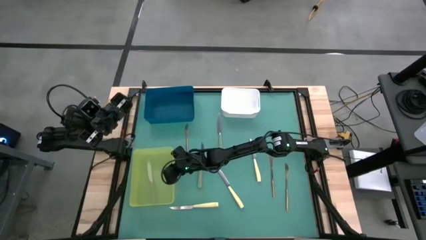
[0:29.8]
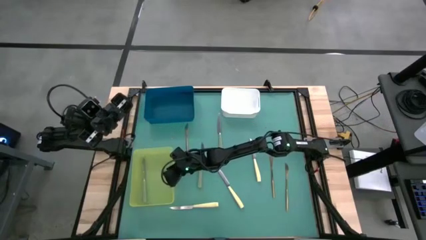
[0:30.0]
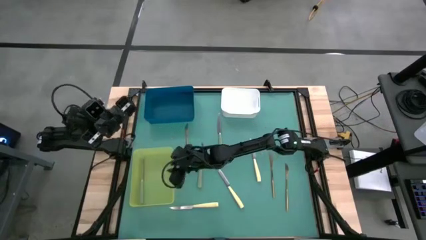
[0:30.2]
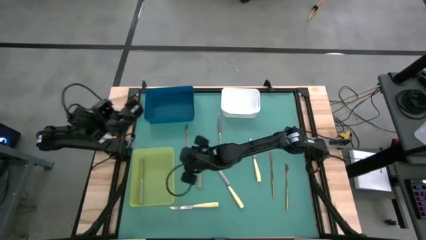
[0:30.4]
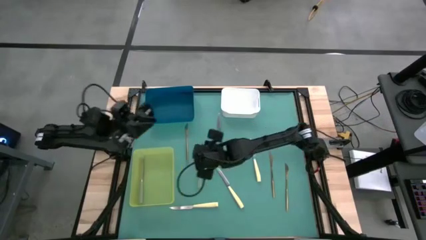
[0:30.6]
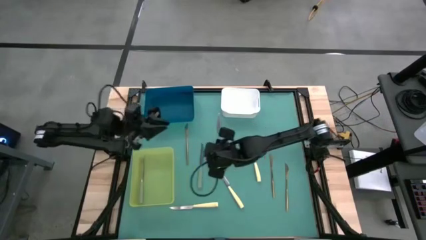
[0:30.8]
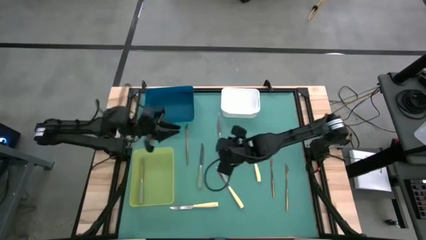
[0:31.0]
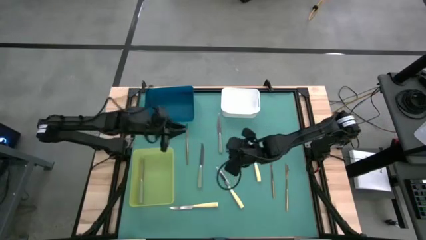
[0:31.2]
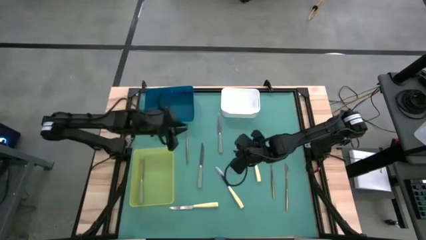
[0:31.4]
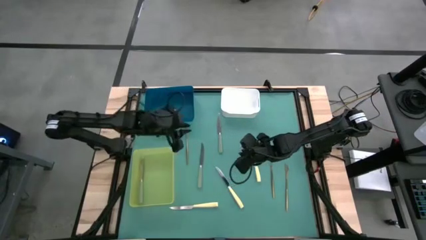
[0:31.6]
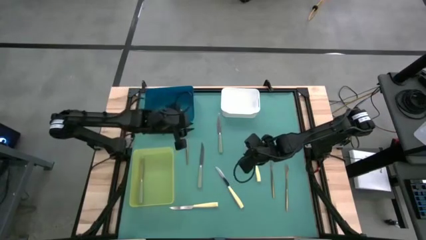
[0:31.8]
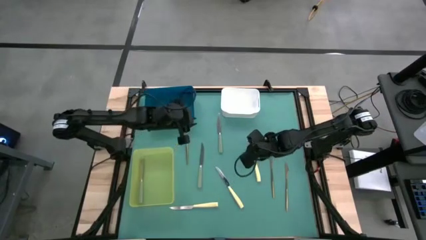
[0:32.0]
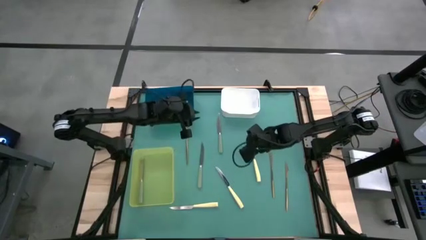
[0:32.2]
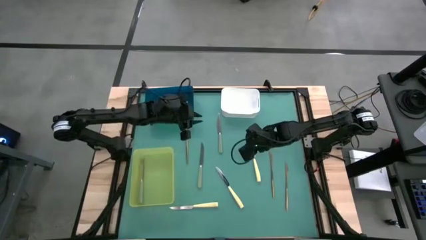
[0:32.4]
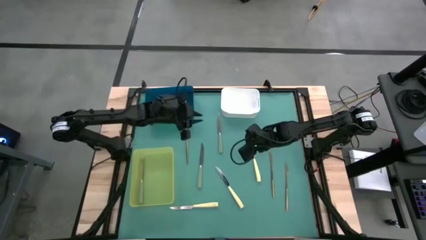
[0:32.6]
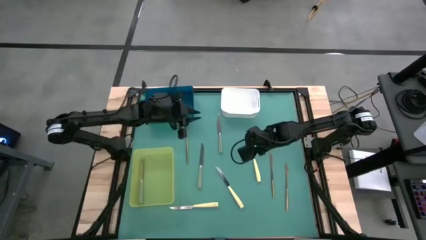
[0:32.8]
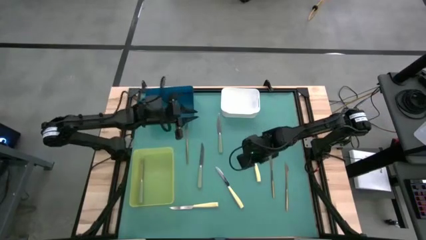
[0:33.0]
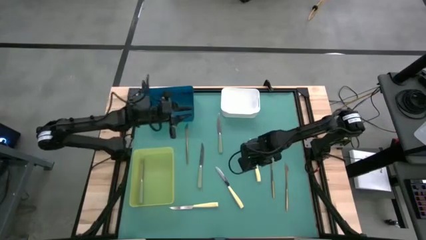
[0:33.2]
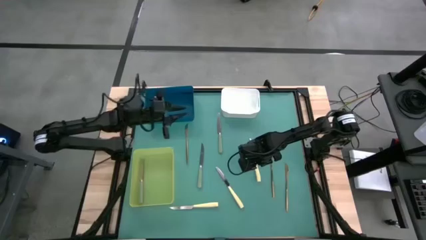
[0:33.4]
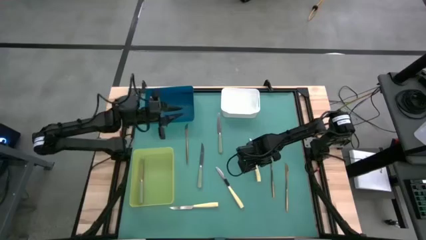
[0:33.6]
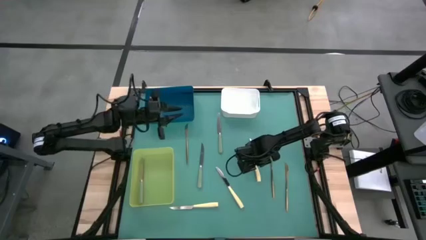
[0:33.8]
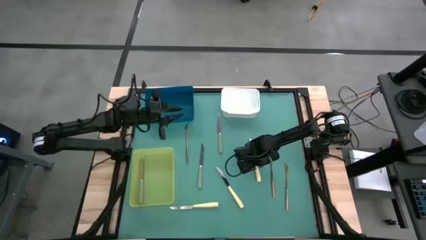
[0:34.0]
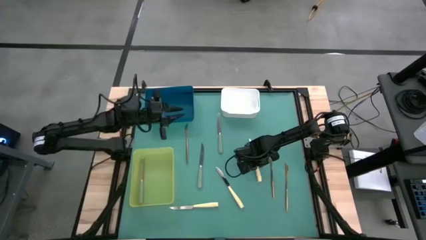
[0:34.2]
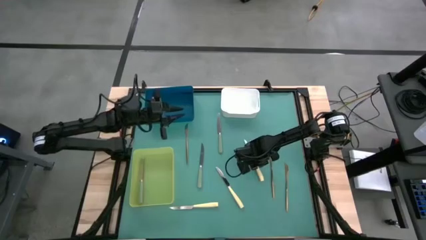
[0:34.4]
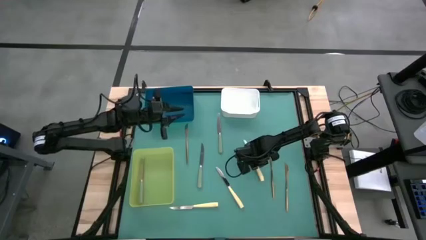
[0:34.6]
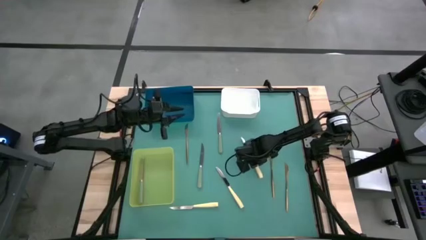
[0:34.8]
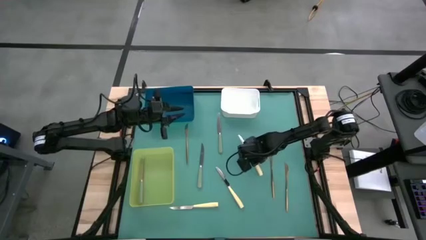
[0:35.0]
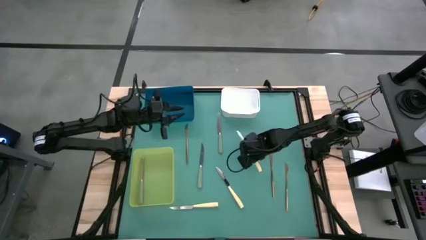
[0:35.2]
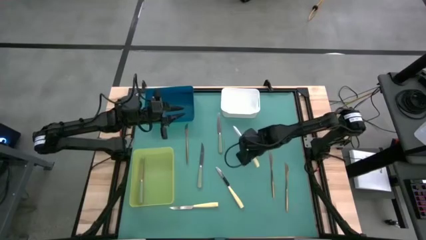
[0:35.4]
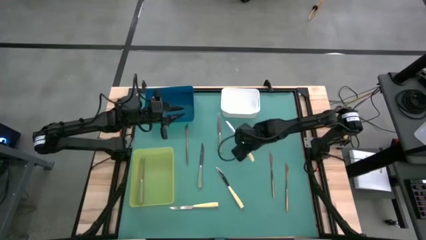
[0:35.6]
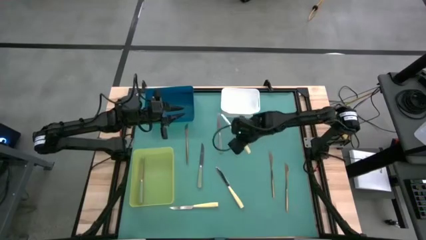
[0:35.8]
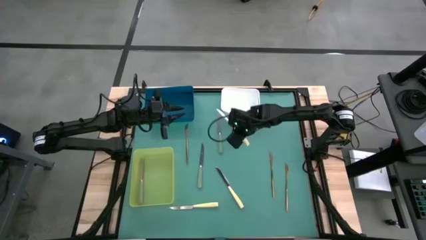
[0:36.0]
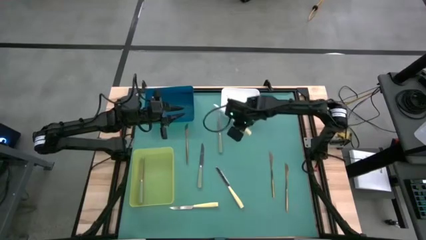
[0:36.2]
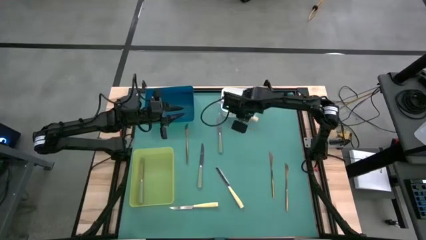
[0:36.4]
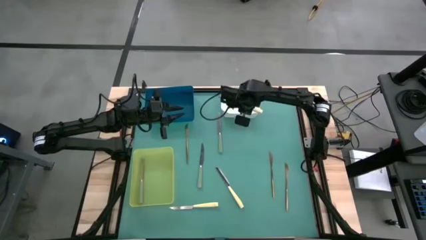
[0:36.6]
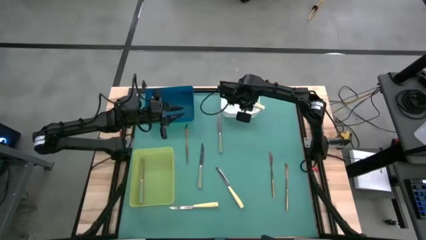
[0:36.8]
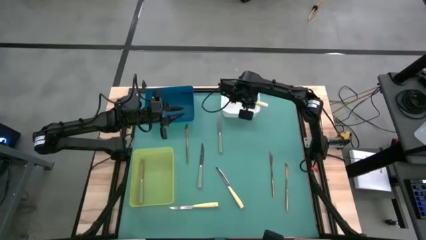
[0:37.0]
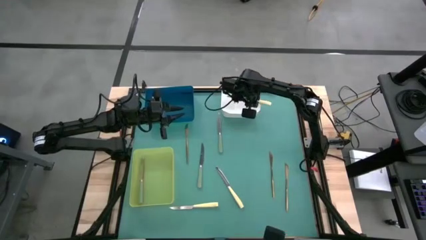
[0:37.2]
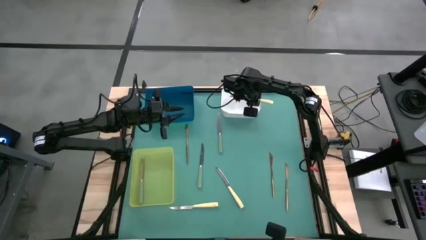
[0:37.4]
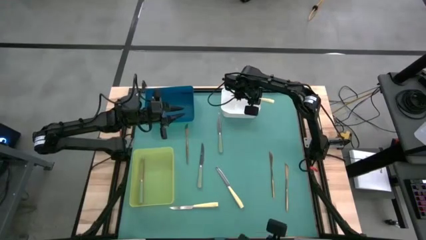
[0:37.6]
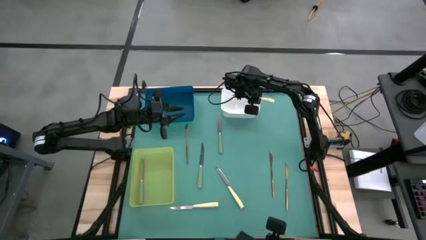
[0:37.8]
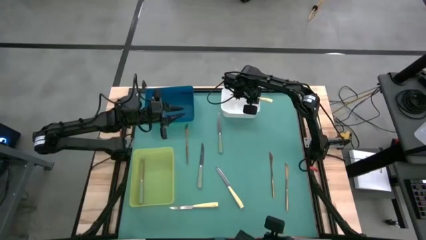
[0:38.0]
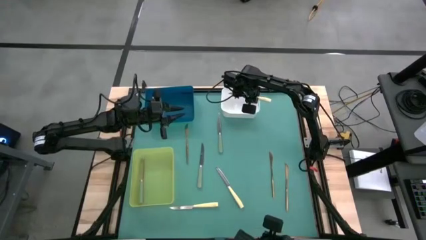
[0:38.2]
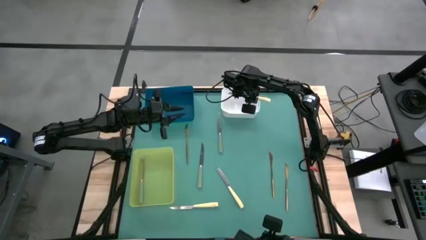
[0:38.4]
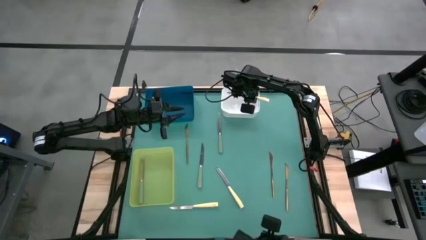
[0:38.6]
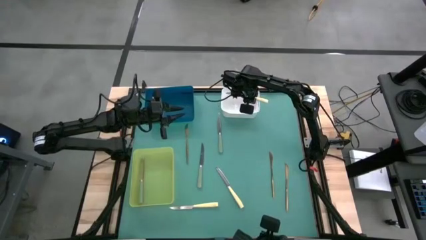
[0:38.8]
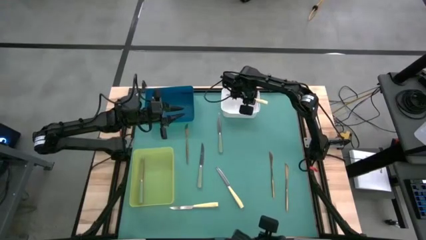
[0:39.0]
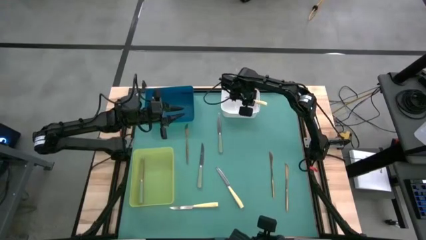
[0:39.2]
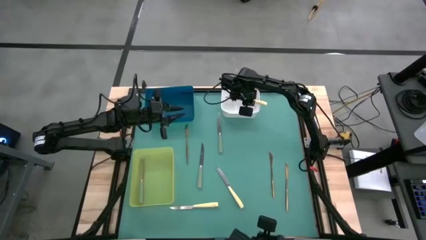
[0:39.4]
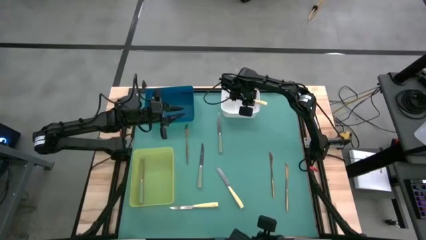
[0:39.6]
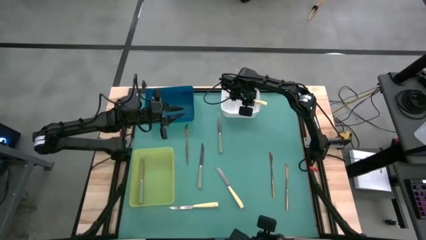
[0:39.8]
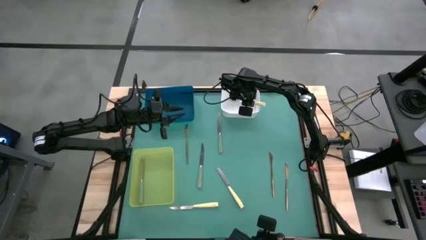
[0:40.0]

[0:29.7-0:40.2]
Task: Sort silverware by color (type)
Put the top yellow knife into the white bin

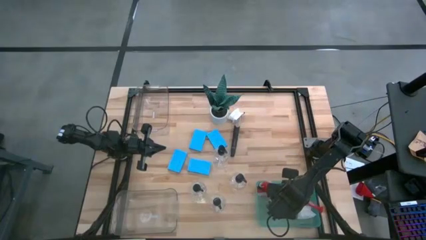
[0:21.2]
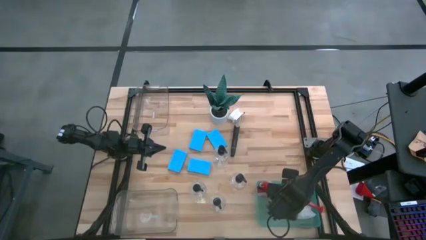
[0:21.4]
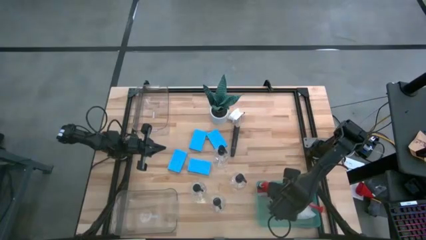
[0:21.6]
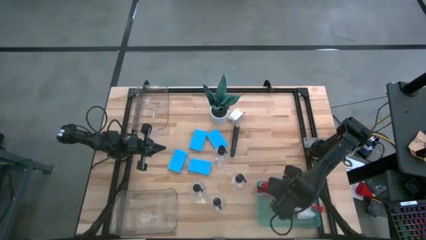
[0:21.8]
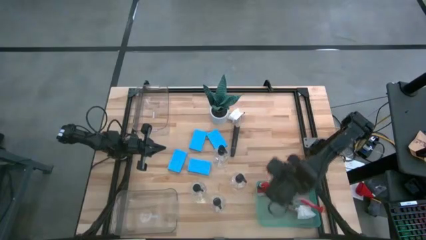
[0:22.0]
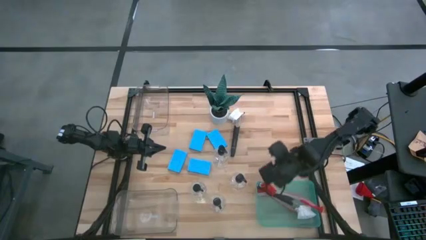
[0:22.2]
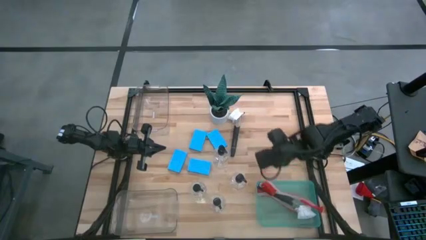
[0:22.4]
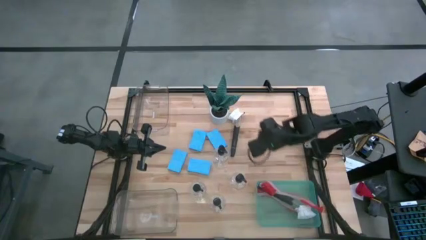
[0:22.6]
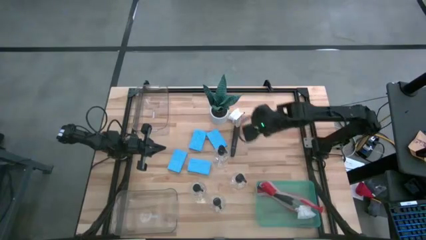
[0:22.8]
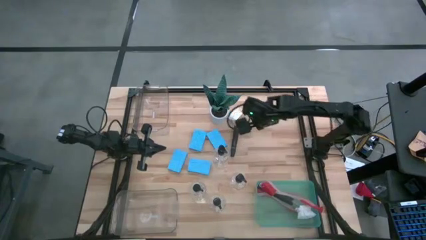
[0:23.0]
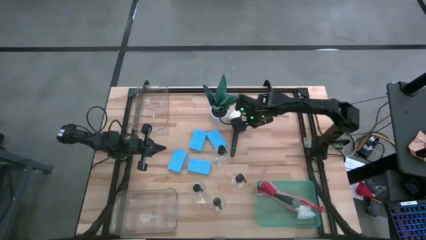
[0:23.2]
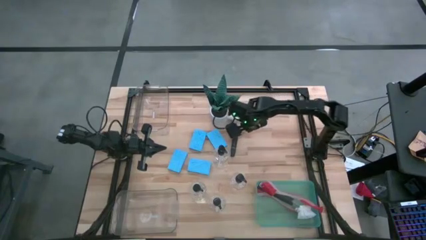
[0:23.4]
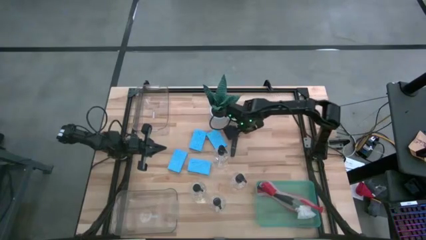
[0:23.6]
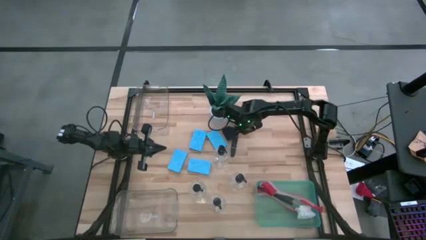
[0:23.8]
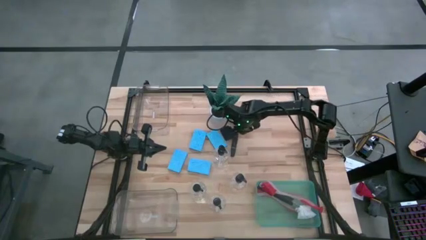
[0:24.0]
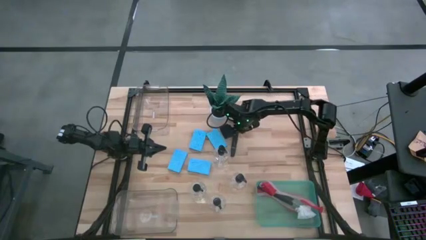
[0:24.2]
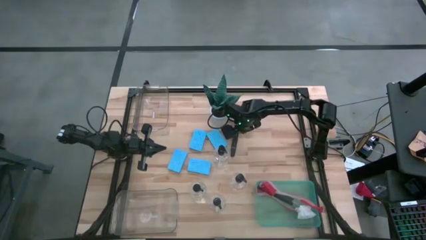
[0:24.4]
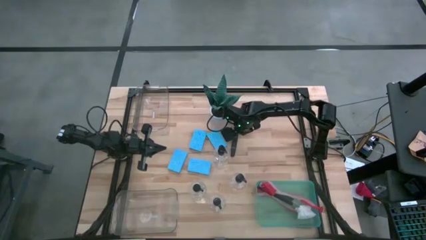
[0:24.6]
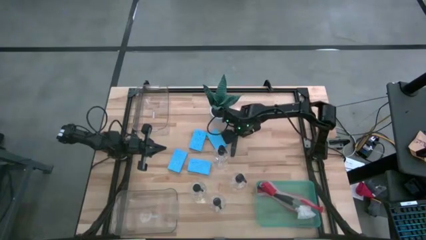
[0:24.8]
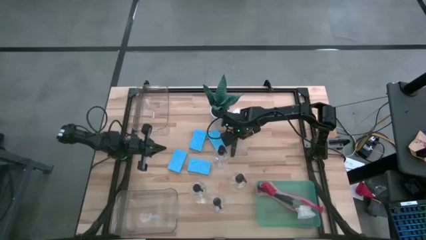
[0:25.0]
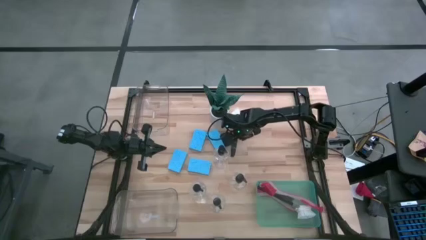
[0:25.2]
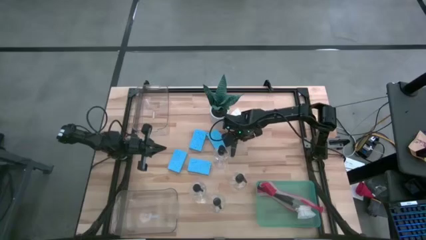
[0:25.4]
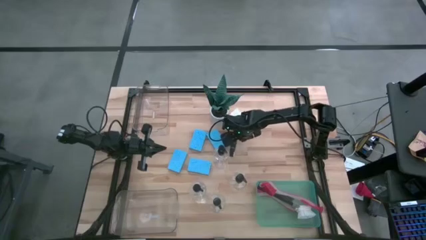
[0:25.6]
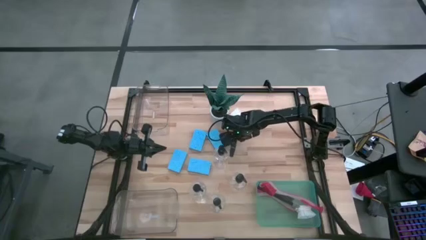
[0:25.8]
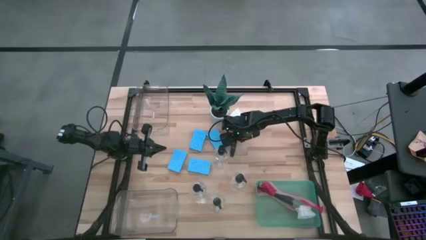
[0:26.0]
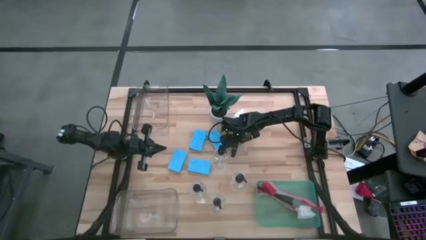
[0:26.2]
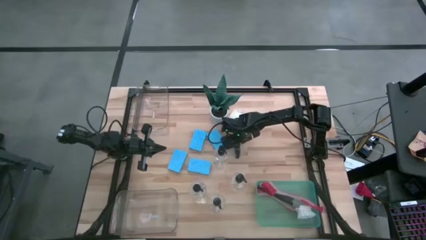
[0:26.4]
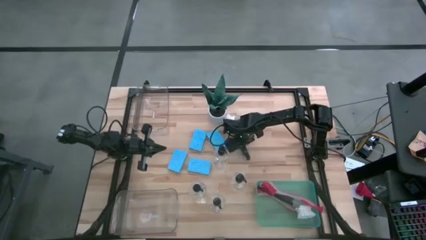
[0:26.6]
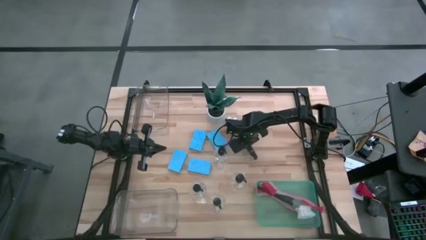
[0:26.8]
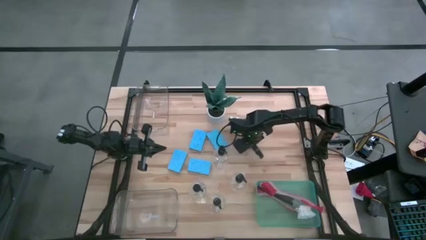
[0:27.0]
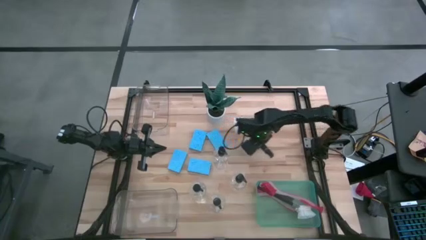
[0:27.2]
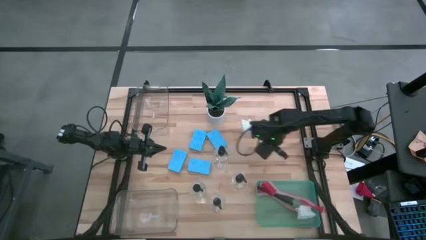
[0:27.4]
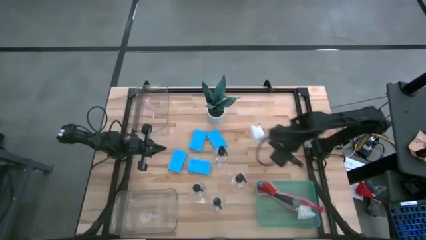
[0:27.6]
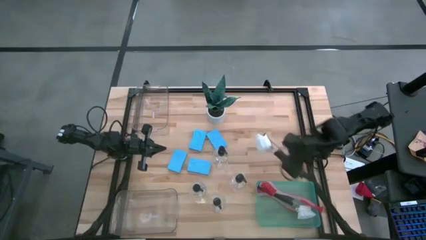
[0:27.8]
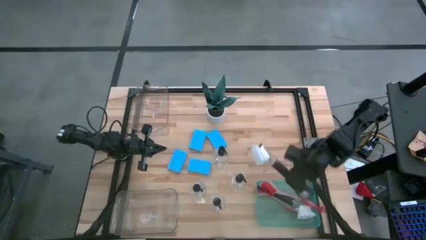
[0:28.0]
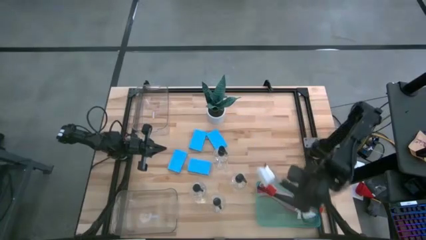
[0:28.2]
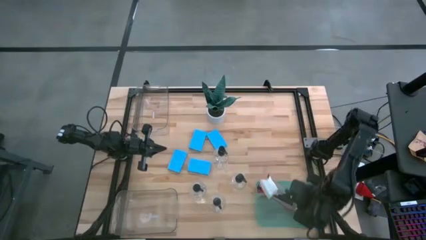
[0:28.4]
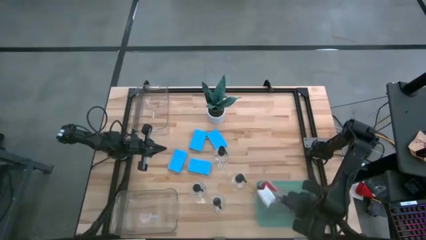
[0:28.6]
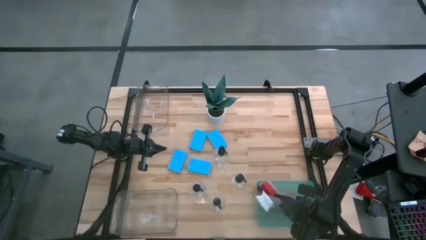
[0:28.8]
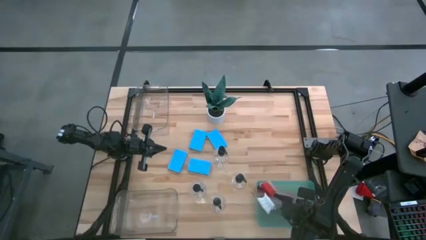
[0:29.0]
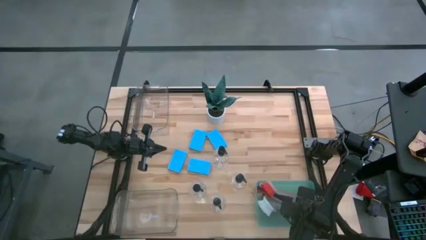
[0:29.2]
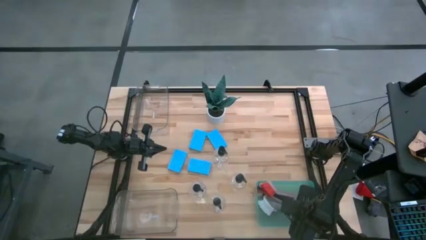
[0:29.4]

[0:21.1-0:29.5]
Task: Pick & Place Kitchen Sink Supplies
Put the black dish brush into the green bin
